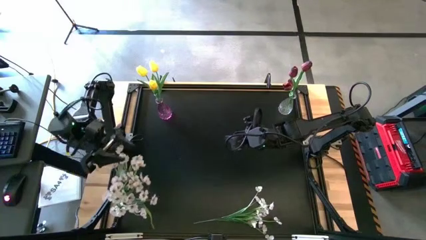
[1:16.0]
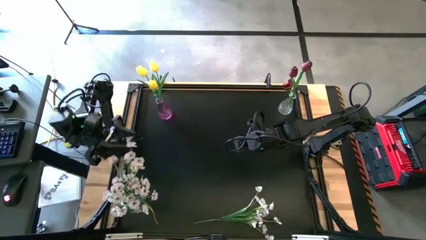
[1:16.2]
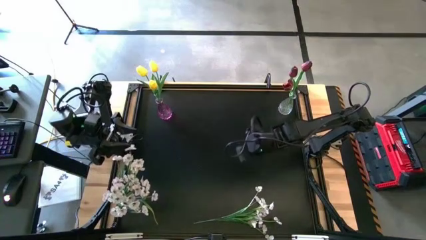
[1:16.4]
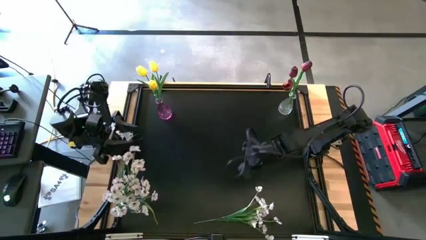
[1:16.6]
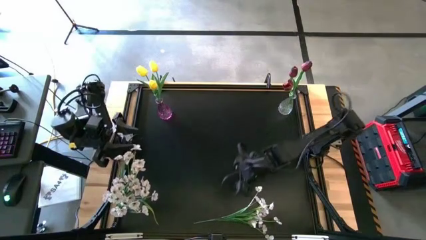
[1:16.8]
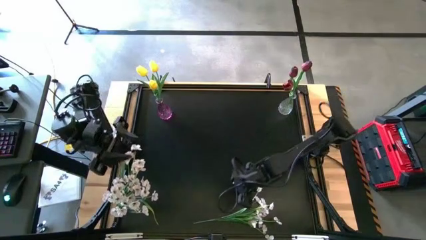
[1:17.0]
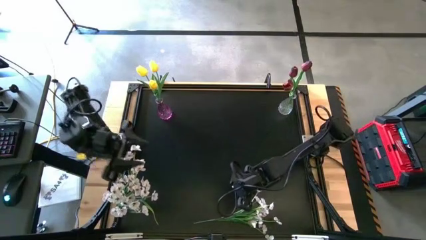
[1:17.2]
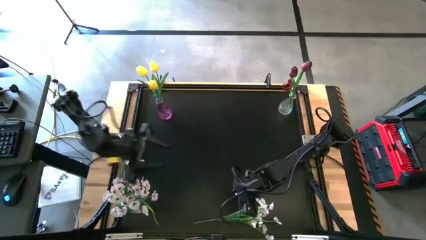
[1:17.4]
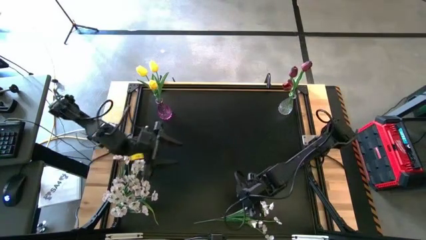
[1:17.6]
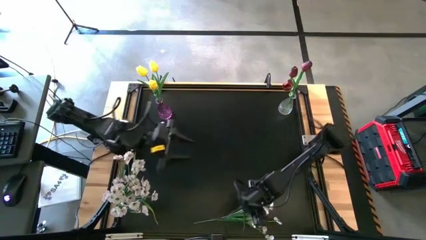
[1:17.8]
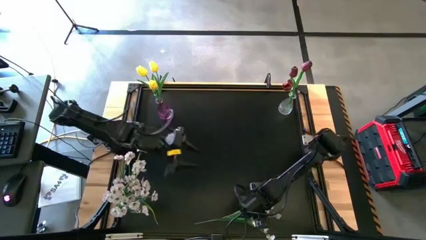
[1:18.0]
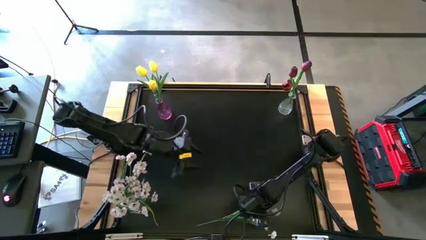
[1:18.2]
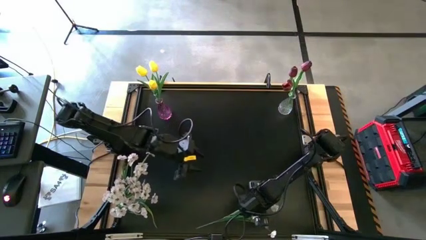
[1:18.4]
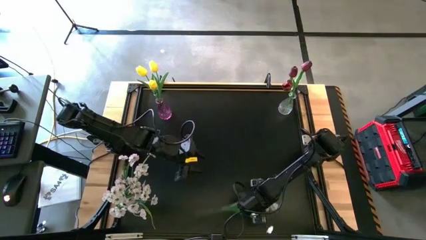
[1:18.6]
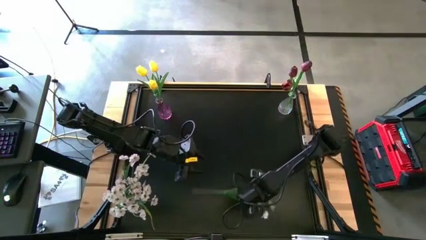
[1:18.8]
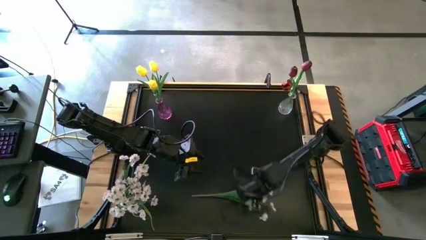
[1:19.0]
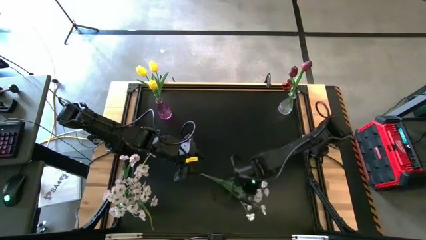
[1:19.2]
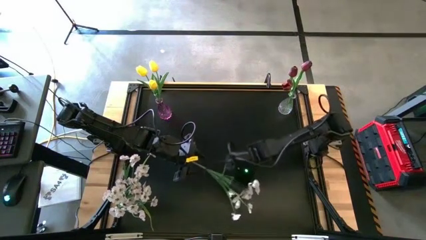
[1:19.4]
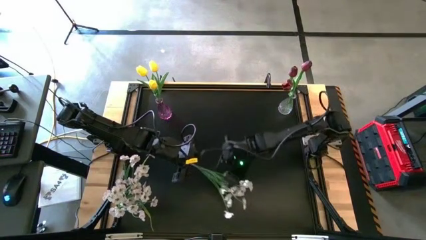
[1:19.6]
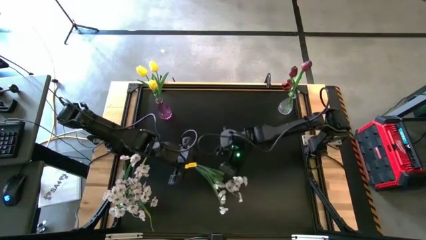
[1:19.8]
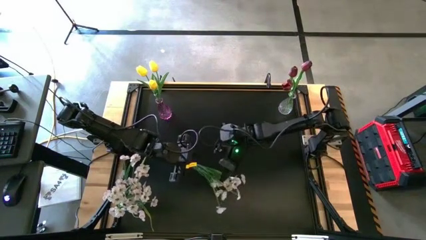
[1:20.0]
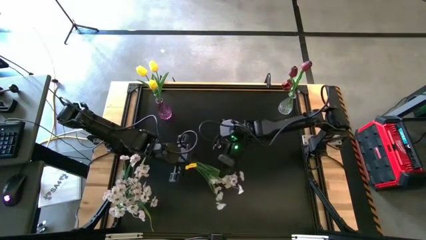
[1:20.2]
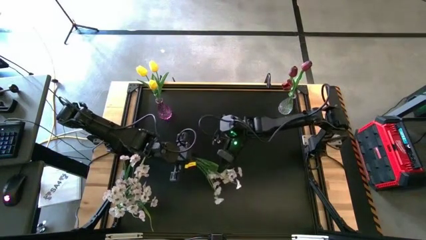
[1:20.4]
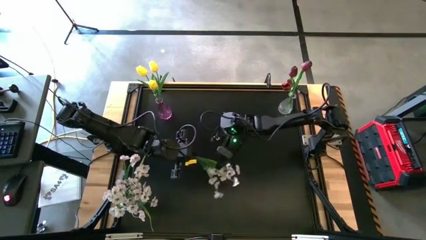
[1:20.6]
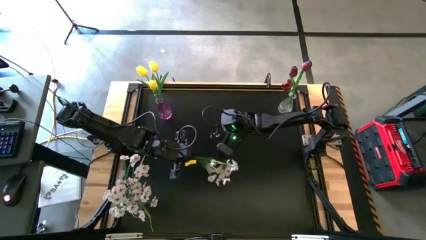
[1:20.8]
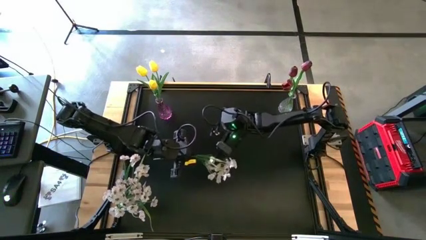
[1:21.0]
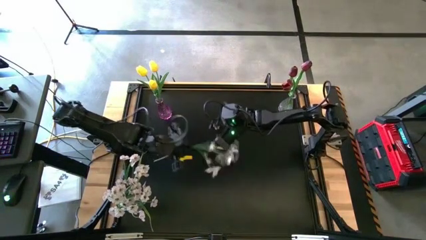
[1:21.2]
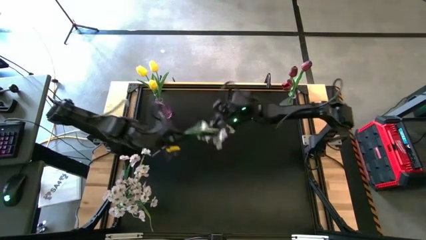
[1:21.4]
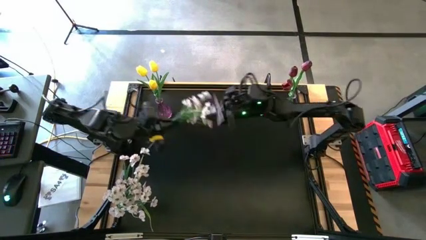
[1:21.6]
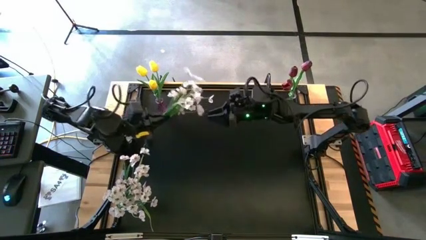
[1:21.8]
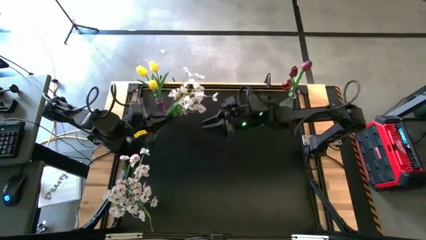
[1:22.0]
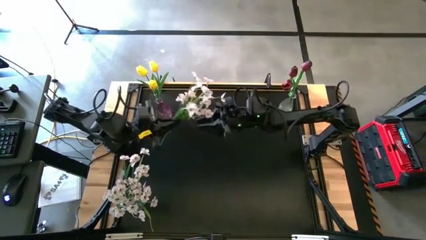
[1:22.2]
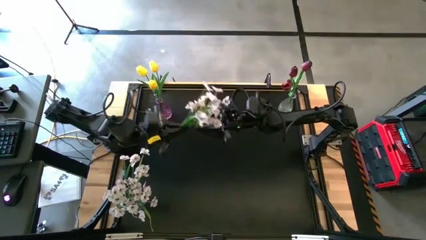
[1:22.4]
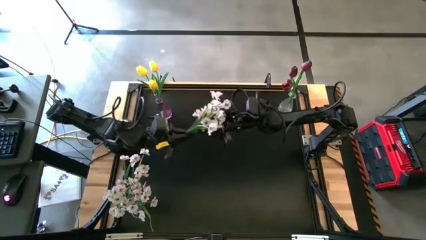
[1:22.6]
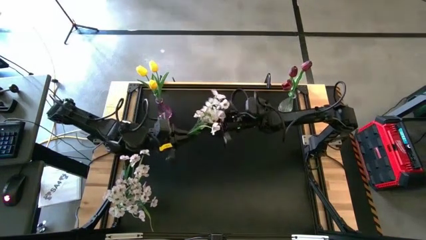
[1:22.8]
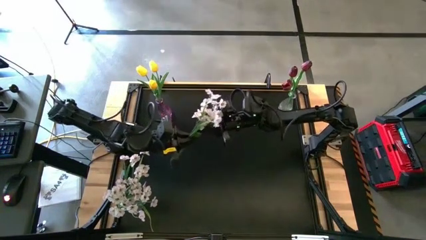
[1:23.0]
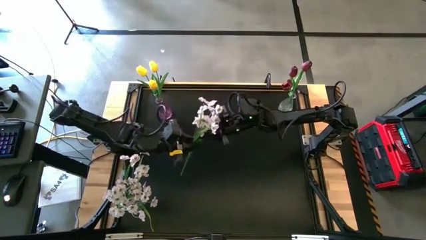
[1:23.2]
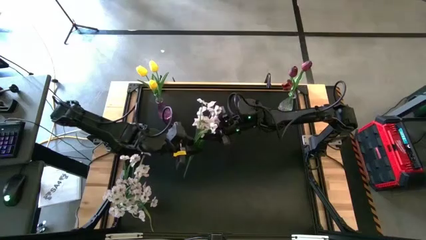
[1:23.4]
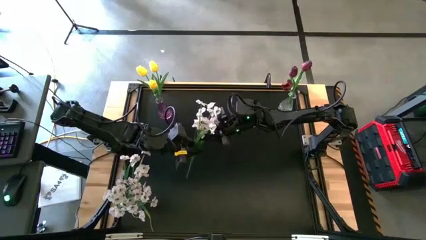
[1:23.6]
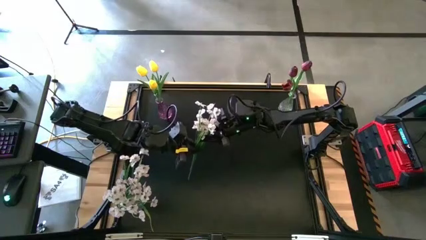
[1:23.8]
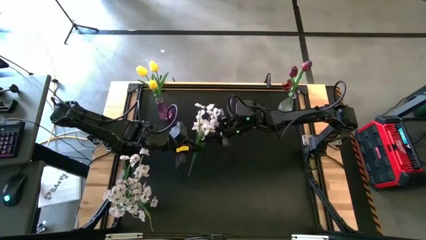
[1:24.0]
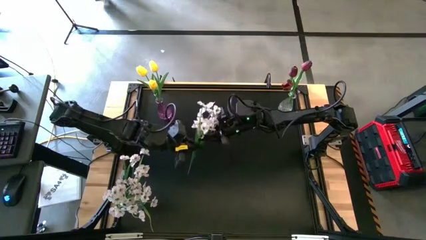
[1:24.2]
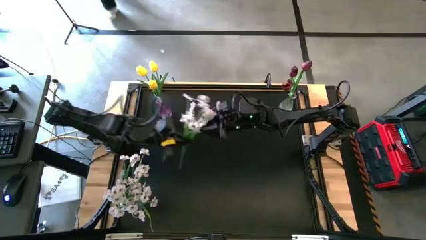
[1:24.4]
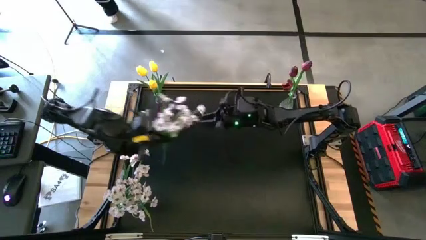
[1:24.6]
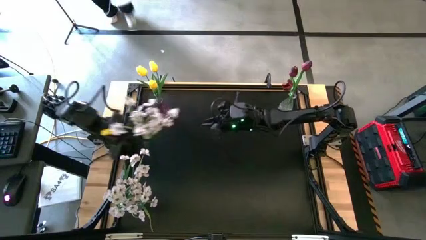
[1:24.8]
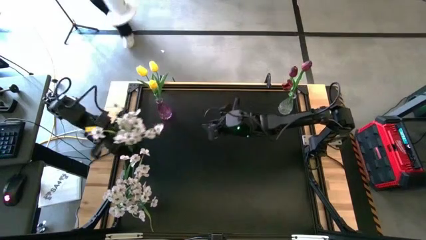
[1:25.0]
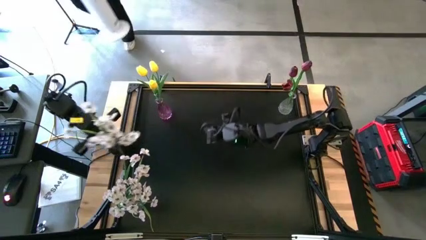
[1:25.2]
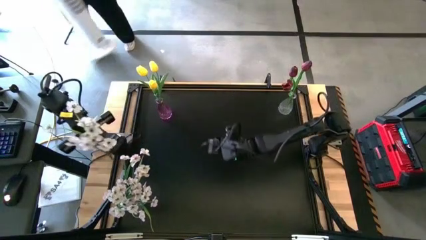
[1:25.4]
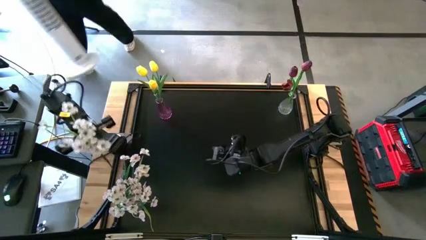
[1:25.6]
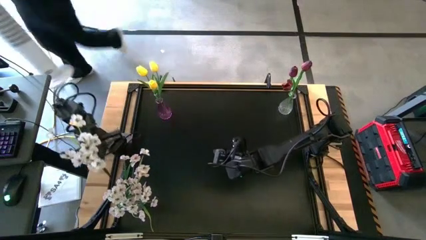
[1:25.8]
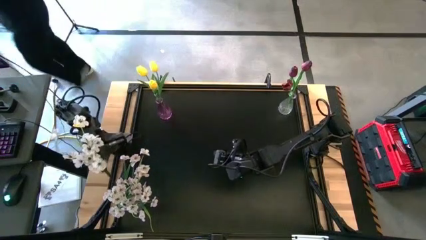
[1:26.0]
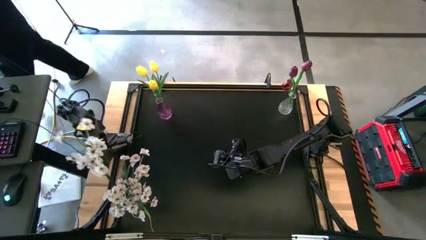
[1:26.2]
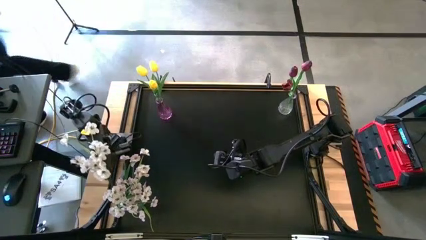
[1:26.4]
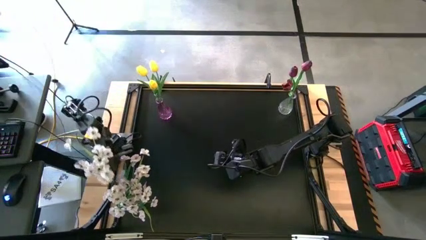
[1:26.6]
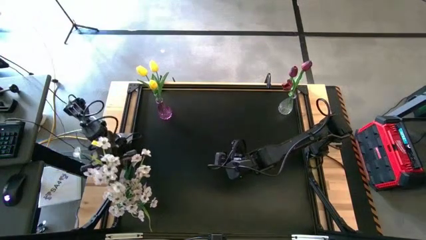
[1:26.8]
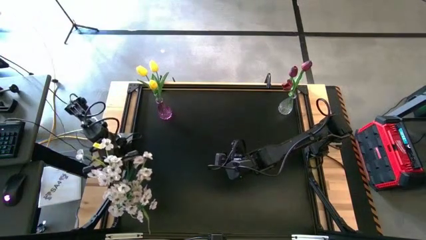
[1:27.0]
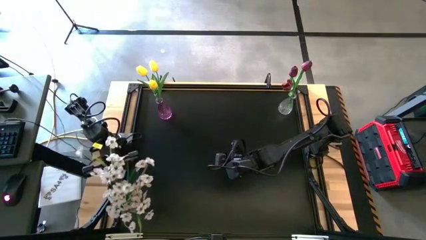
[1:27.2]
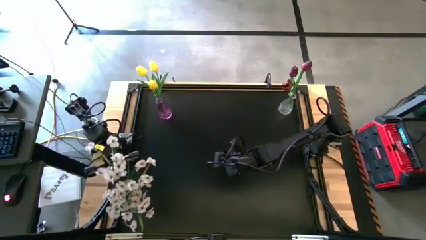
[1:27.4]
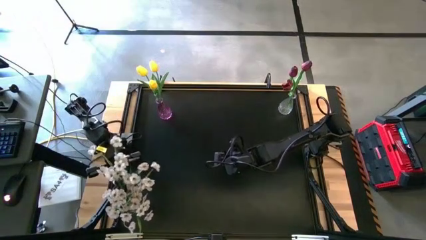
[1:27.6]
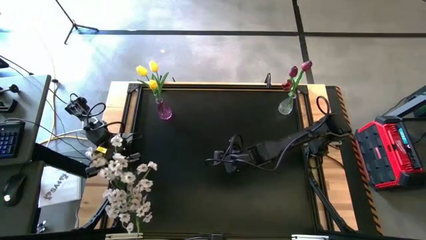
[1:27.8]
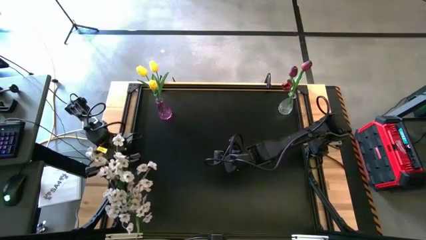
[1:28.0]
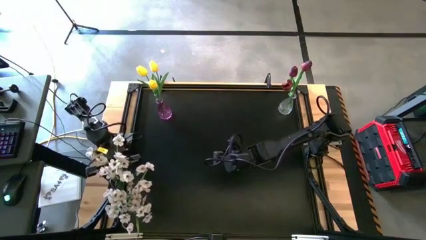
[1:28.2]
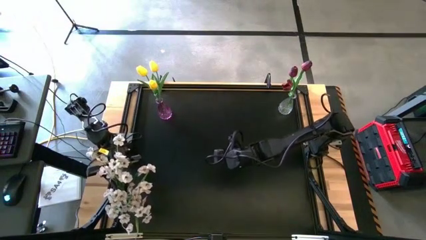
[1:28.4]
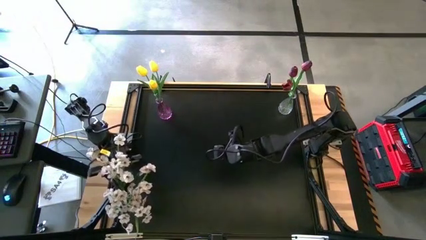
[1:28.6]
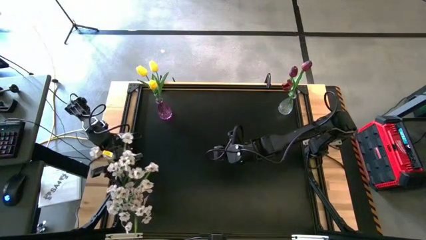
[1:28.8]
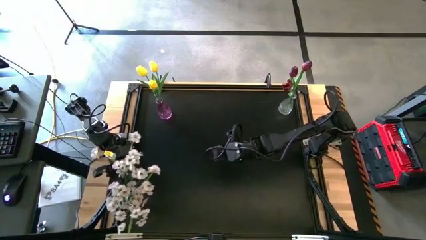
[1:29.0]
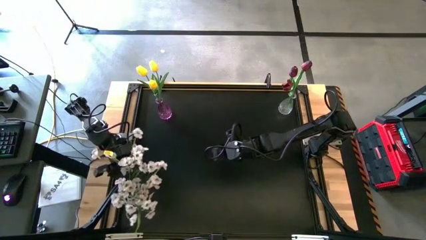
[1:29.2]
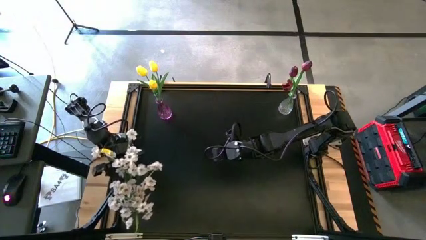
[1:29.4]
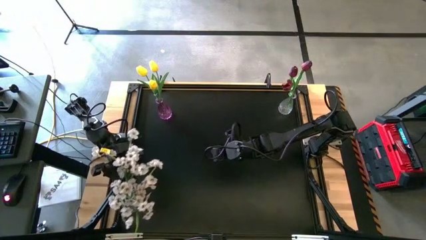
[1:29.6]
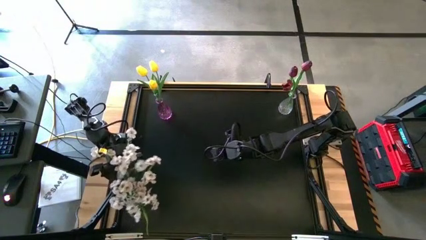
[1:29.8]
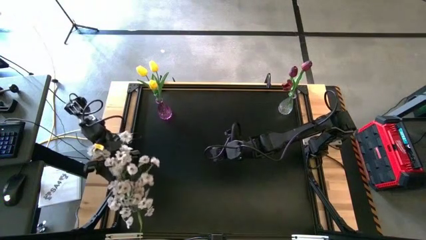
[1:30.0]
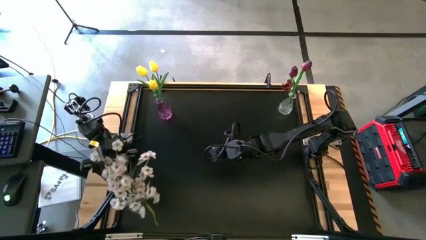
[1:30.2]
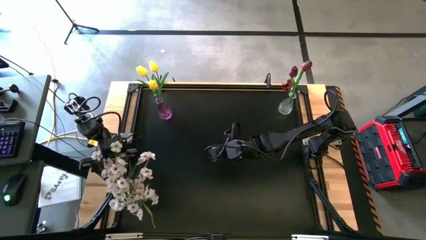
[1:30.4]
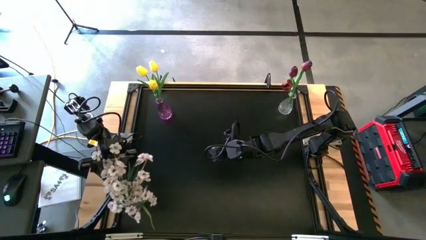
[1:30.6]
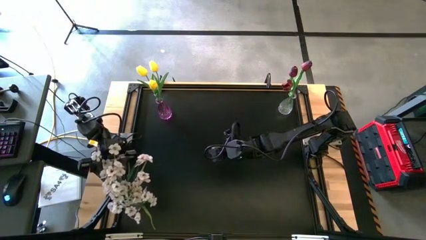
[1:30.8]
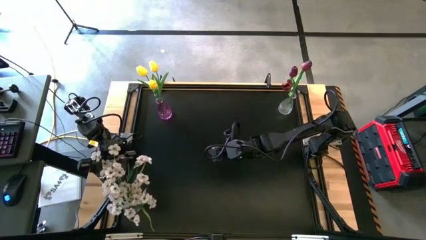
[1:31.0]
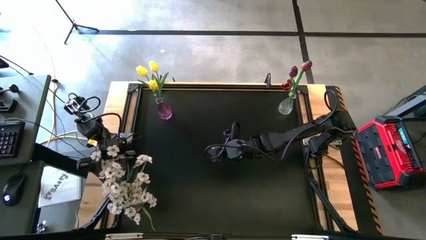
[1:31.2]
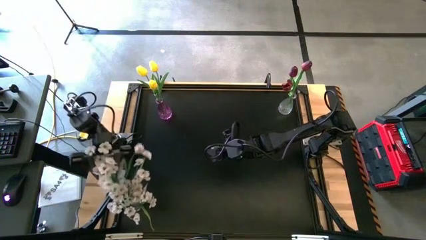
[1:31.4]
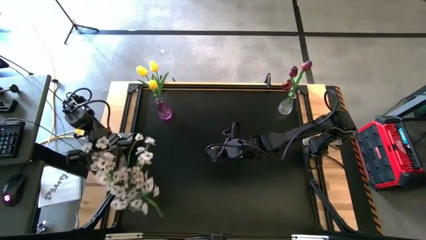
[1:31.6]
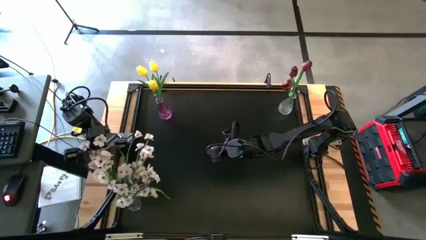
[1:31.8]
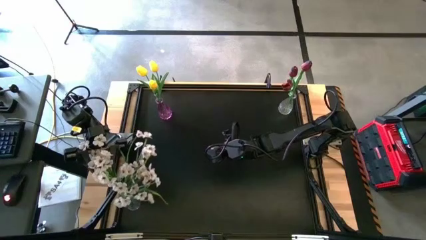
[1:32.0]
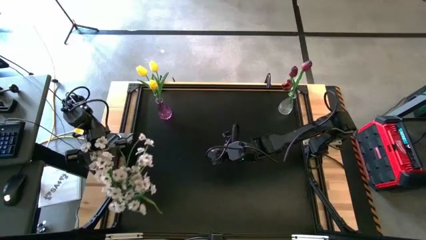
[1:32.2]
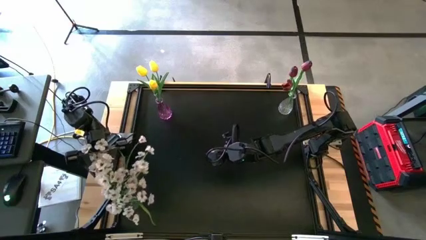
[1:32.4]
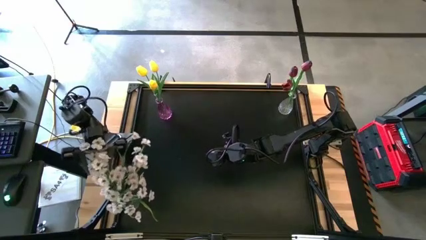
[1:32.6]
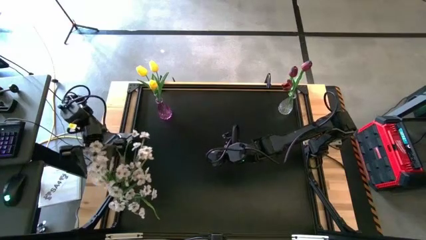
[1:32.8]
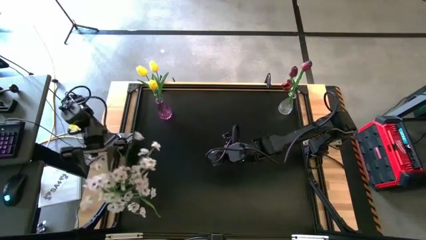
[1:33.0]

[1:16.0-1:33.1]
Task: Sort flowers into vase by color
Put the white flowers into the bottom transparent vase
